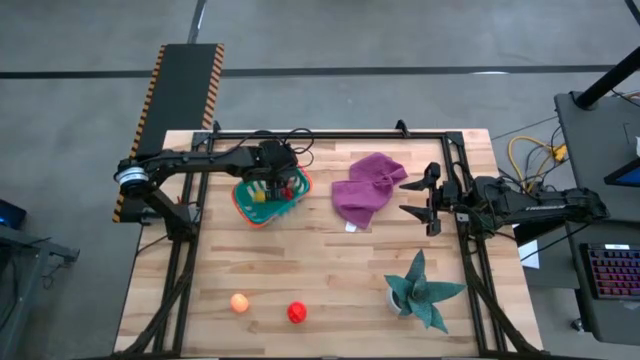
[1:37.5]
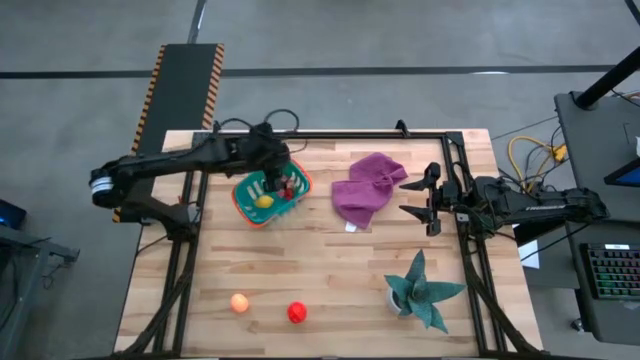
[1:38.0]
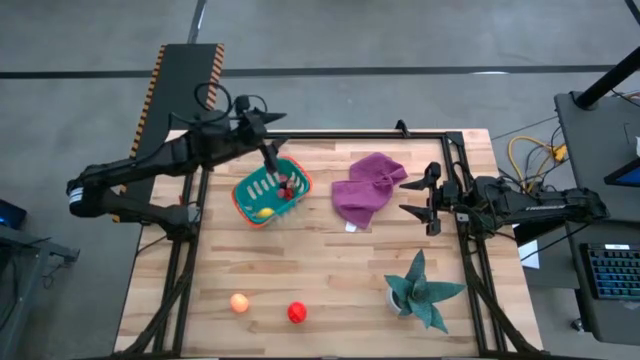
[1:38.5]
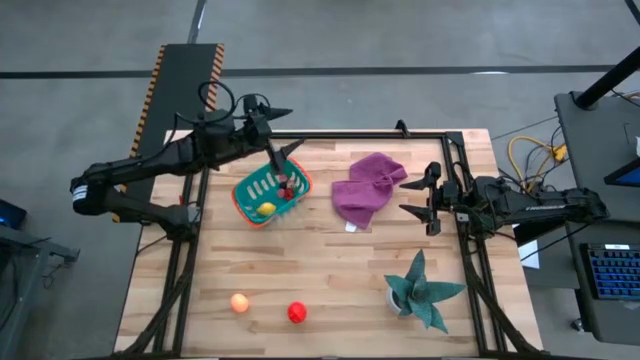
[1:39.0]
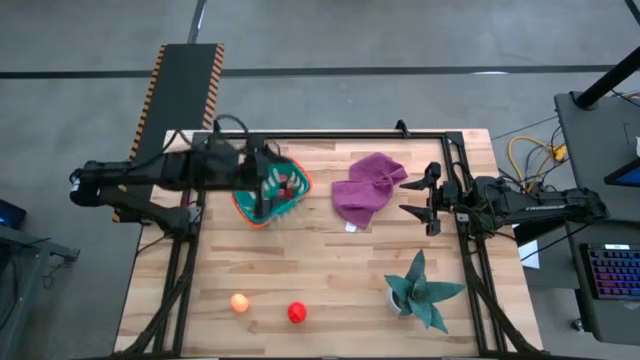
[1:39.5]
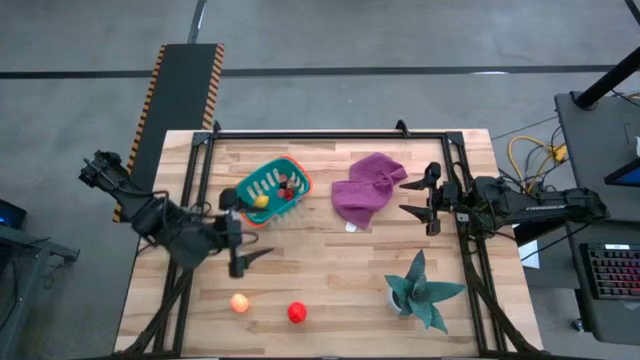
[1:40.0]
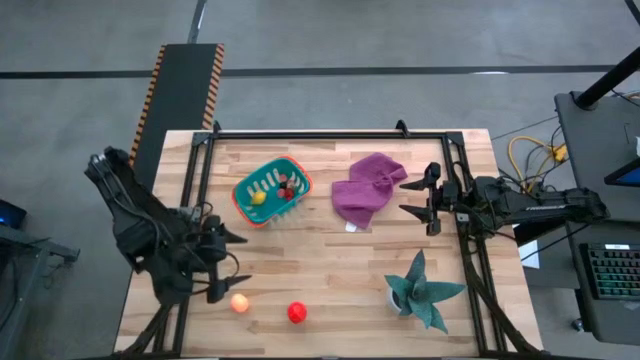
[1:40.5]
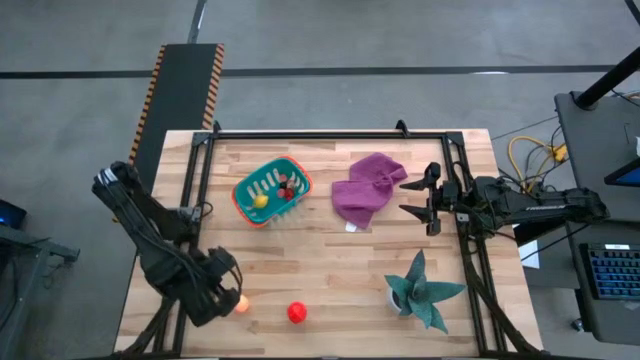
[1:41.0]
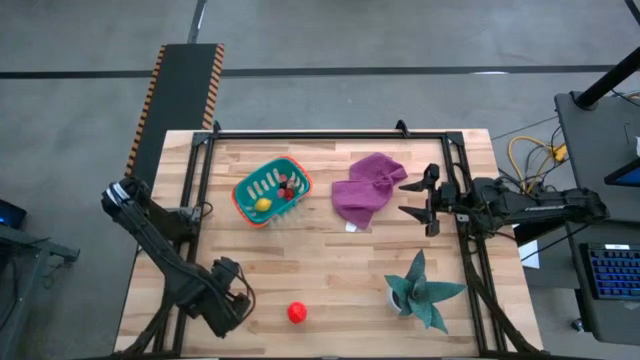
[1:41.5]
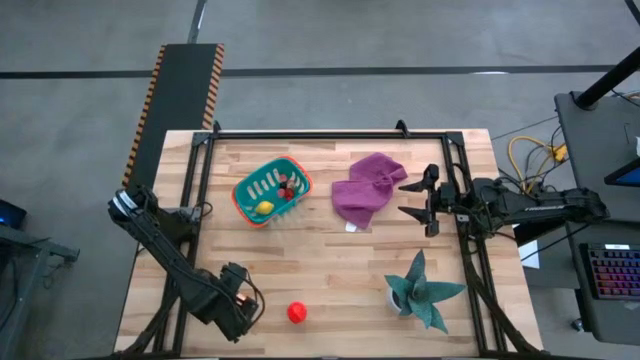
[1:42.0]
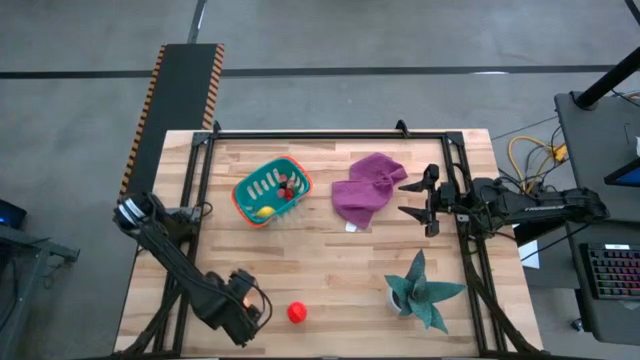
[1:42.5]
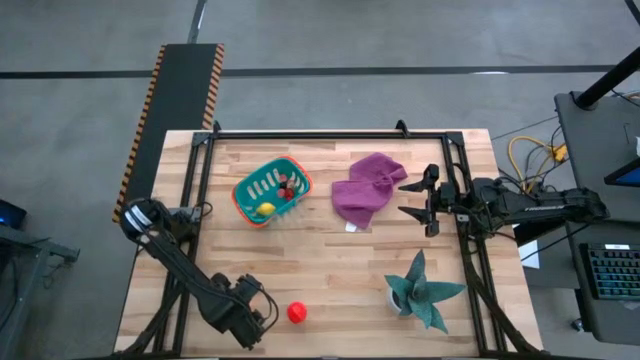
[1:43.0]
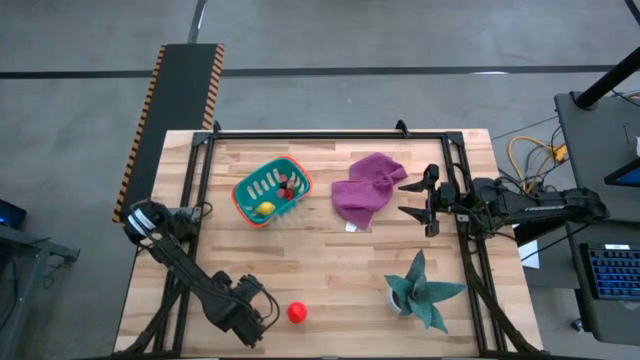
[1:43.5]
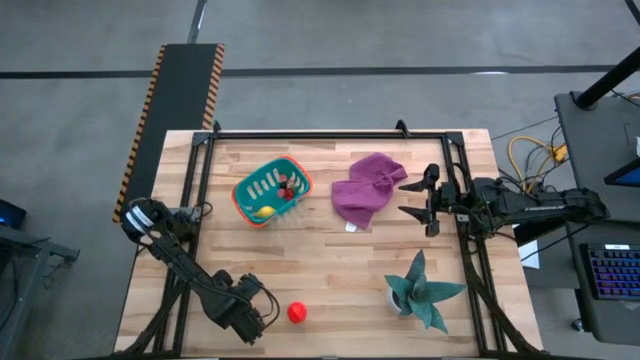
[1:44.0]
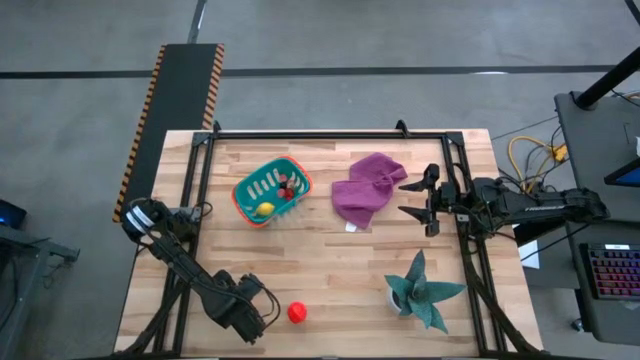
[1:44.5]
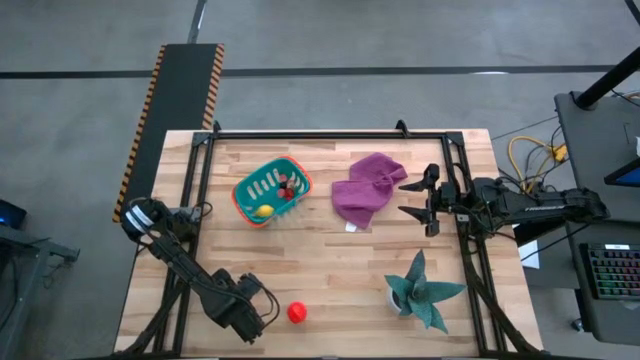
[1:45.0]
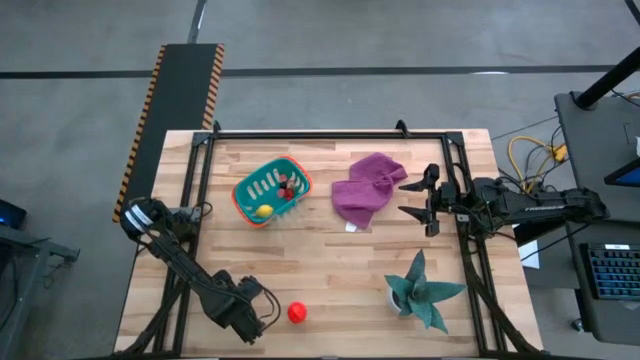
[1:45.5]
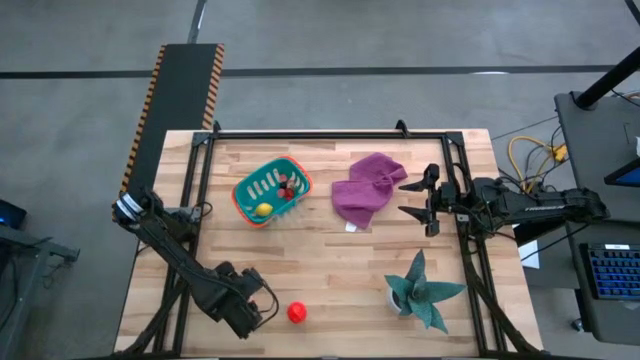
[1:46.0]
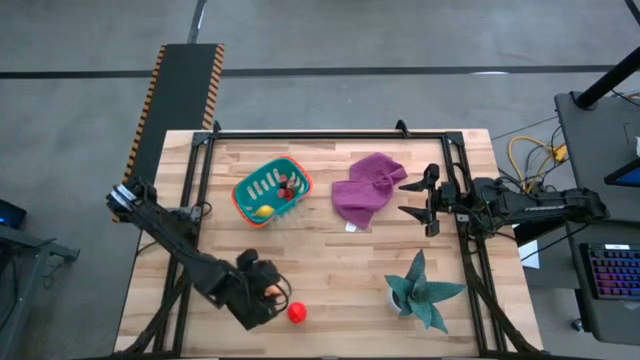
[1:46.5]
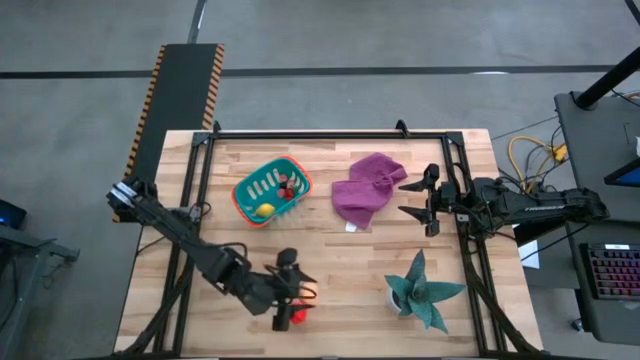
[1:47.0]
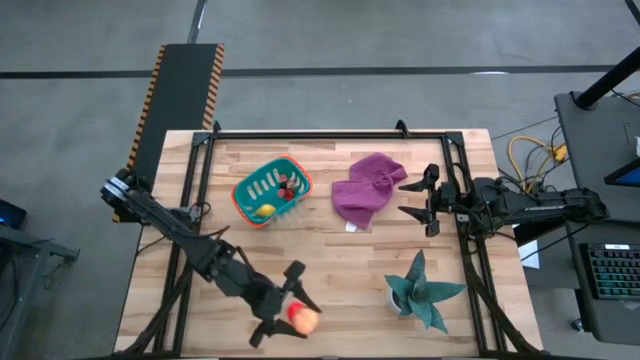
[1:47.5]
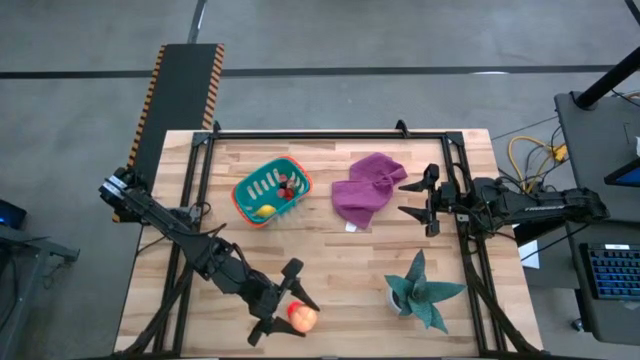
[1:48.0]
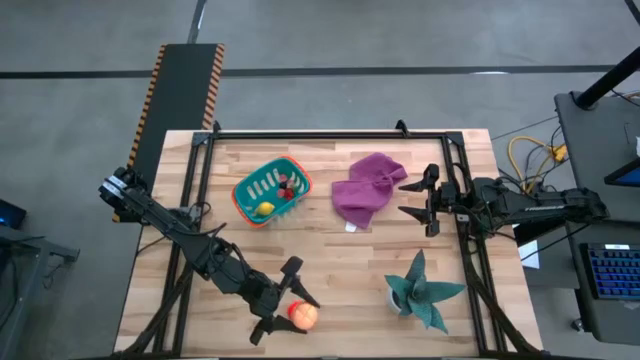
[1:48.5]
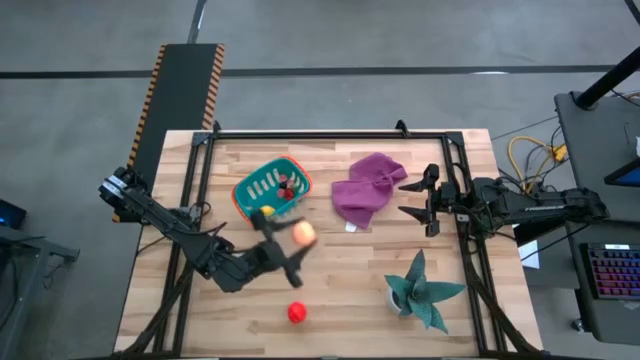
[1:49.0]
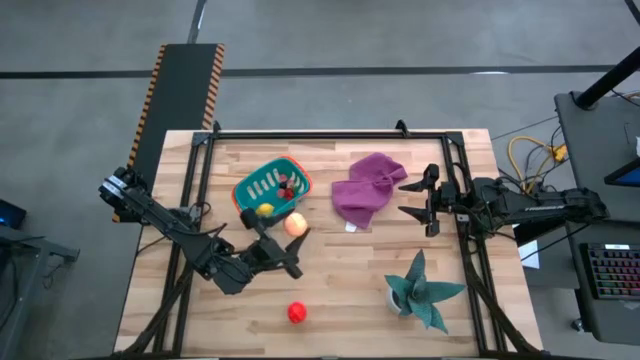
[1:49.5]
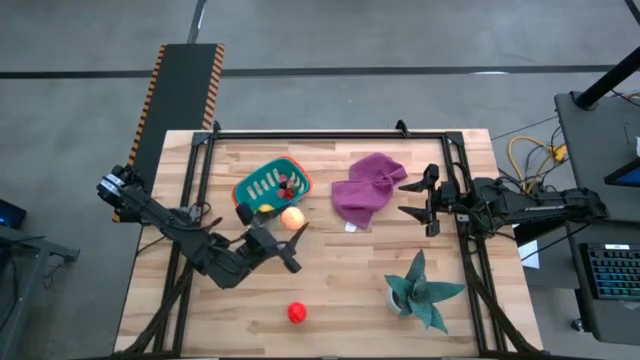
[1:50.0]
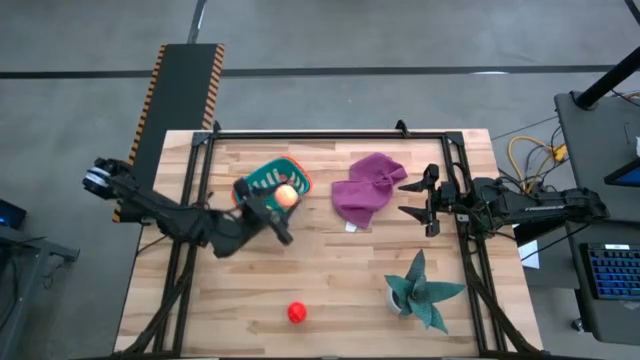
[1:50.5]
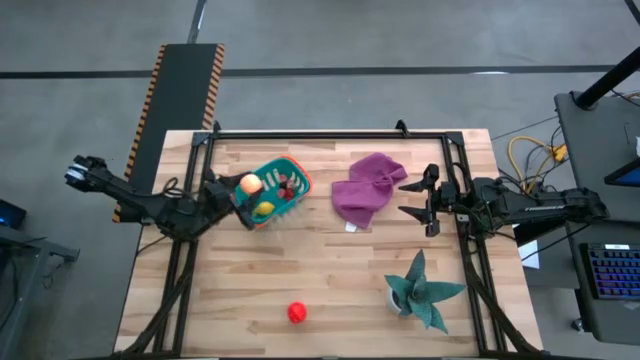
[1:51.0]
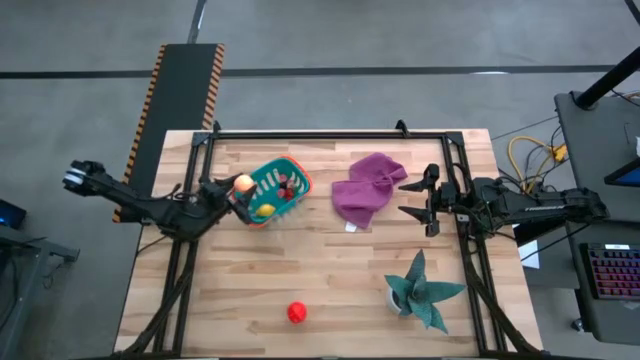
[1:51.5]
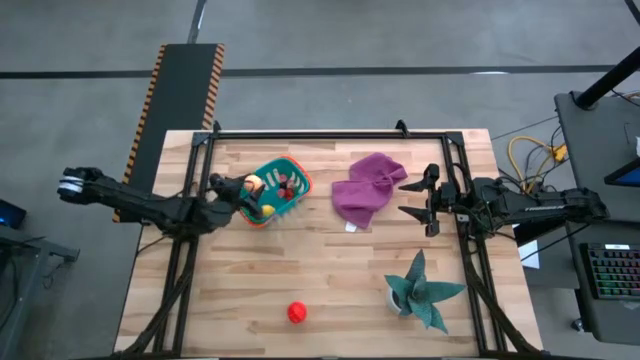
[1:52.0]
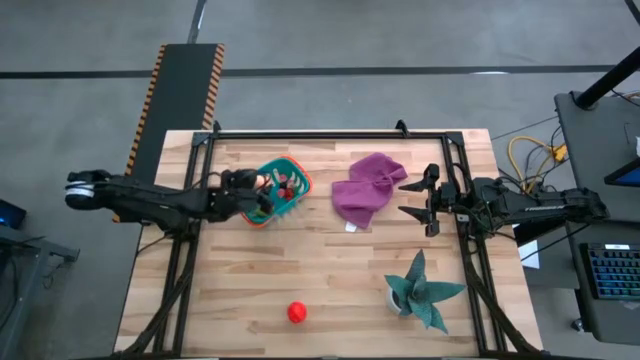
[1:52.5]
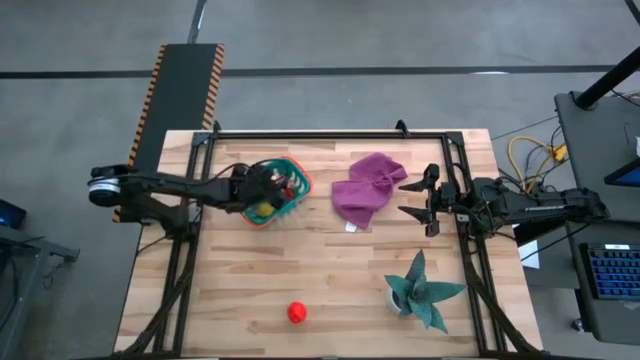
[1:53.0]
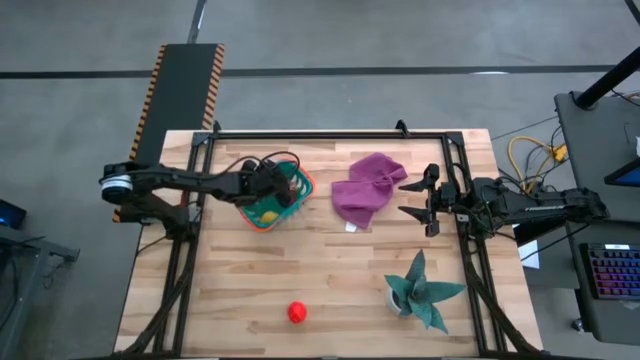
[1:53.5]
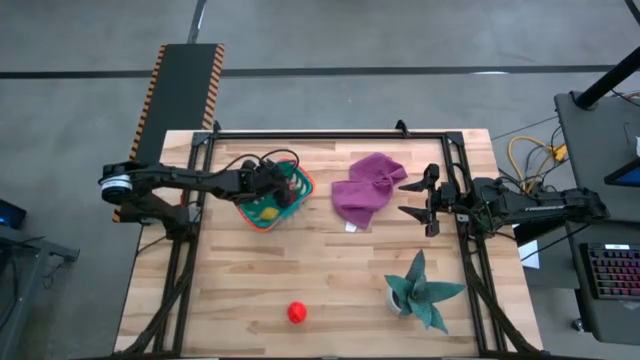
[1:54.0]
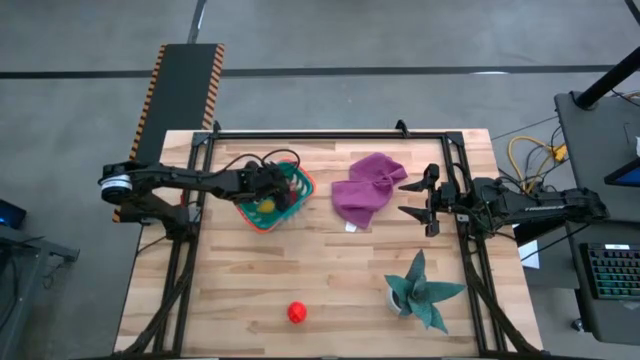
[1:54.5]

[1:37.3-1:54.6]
Task: Pick and placing Produce into tupperware
Put the orange peach into the blue basket

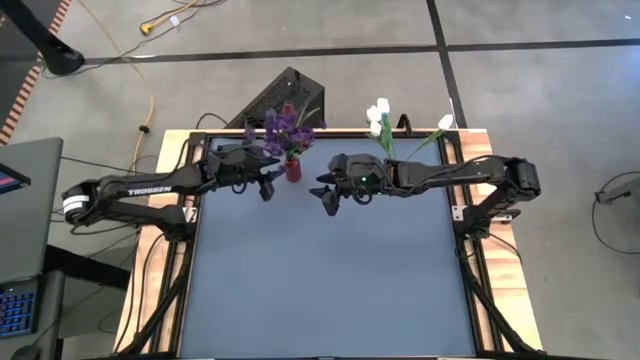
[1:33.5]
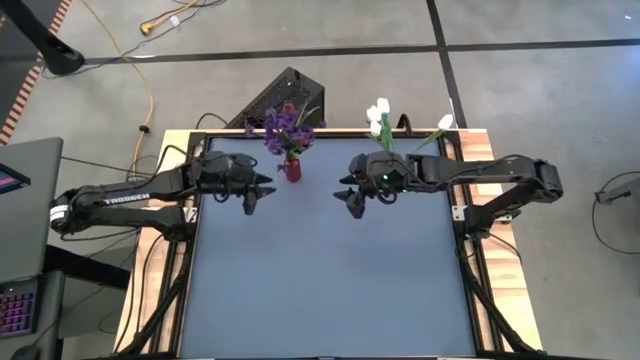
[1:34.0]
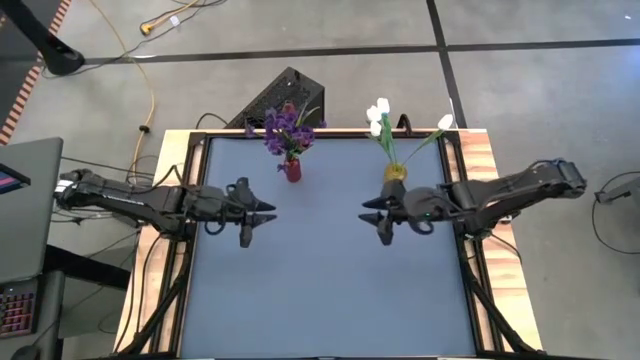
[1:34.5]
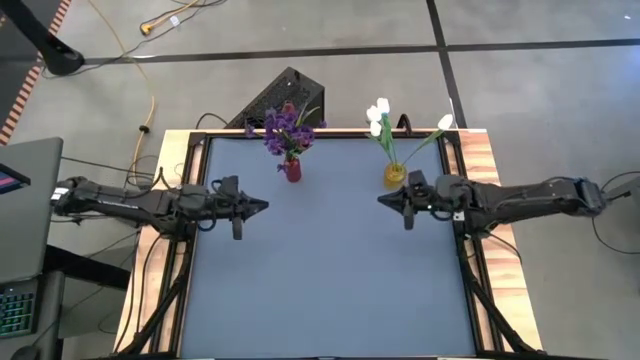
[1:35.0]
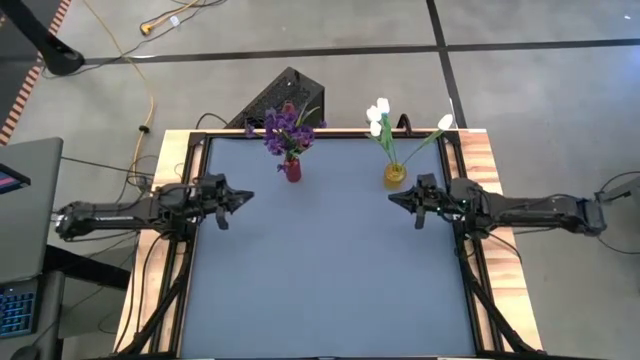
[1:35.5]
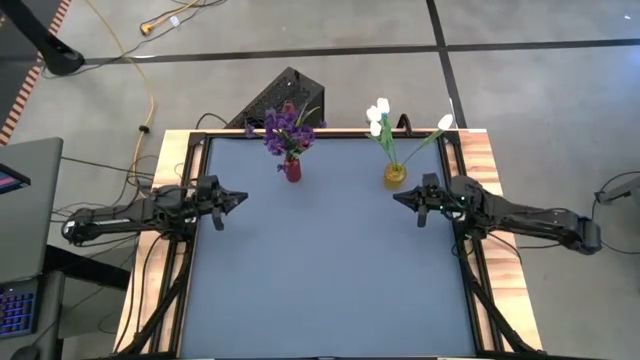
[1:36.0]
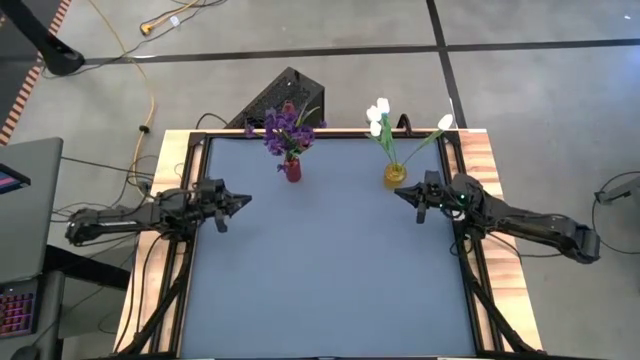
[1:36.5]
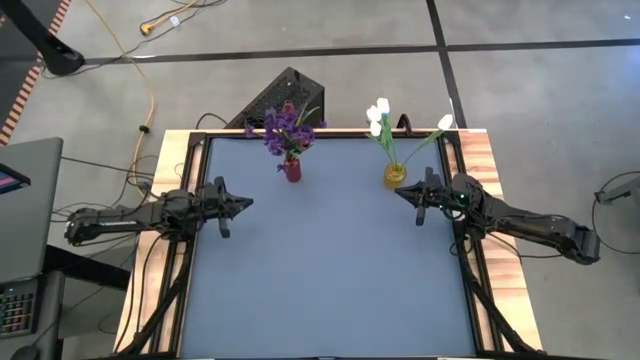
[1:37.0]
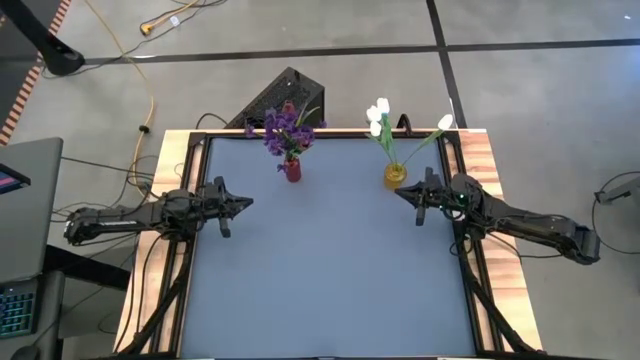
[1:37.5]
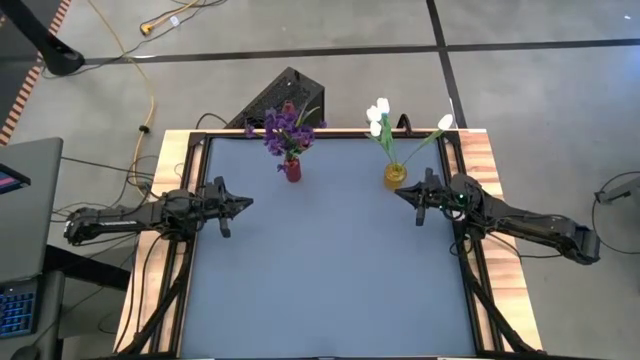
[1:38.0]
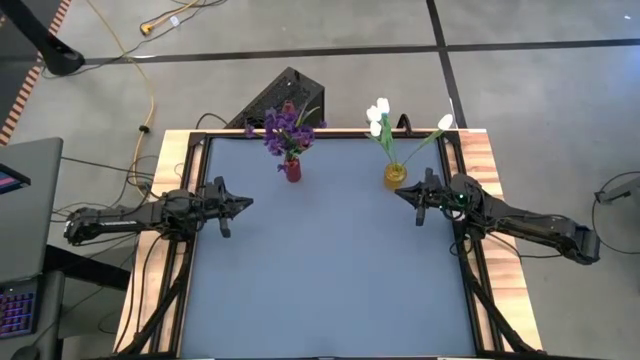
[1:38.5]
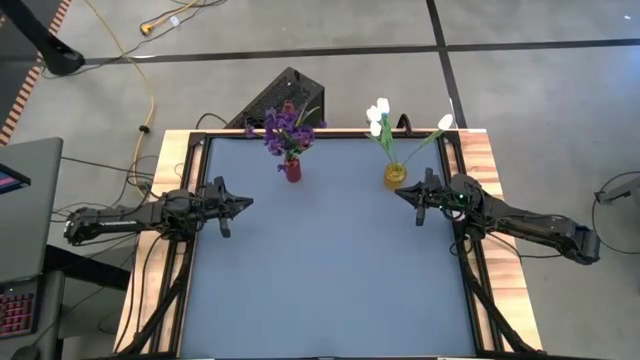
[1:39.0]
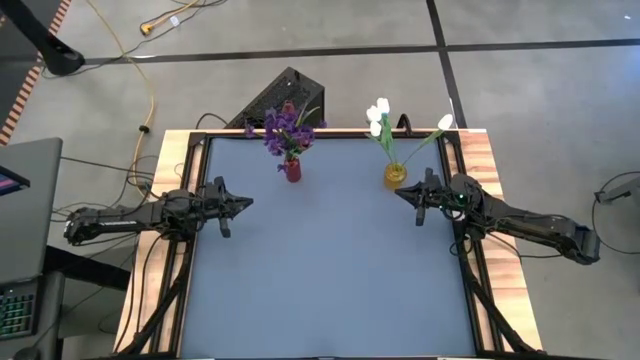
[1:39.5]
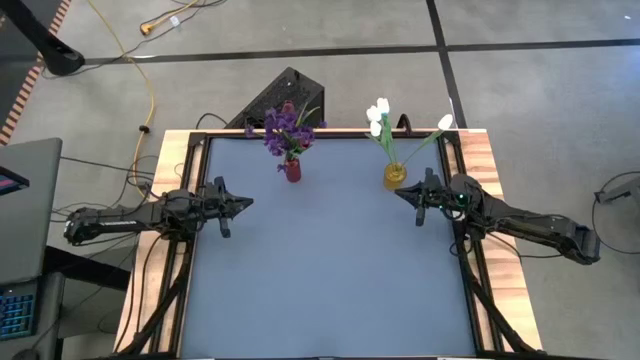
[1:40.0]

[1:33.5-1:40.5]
Task: Sort flowers into vase by color
Return to Home Position
